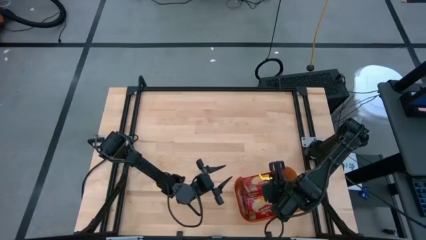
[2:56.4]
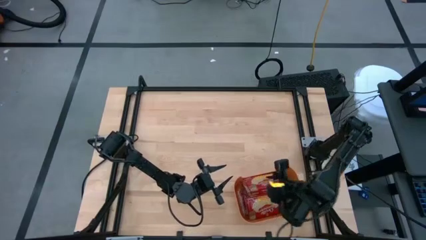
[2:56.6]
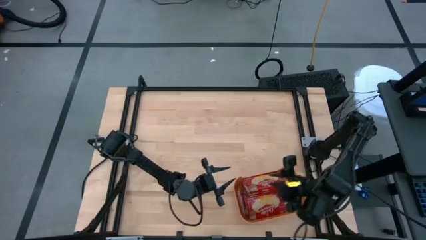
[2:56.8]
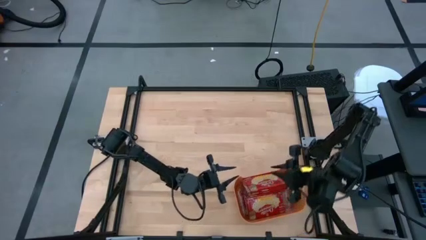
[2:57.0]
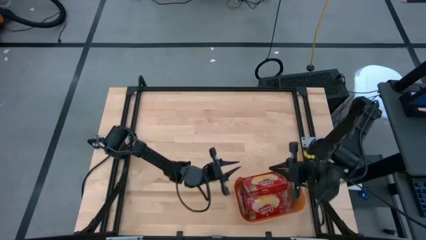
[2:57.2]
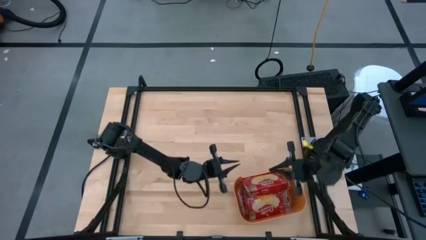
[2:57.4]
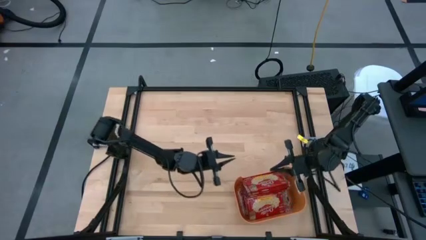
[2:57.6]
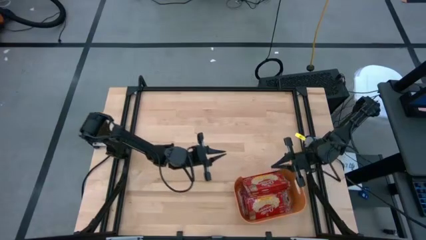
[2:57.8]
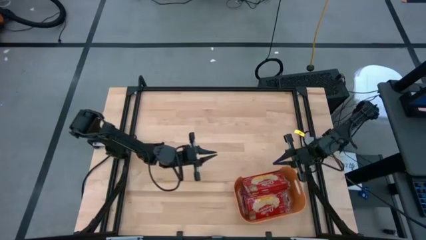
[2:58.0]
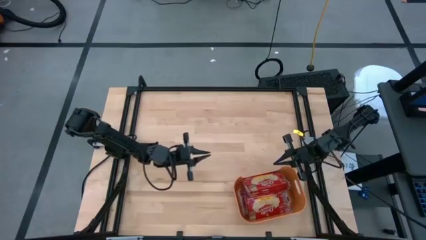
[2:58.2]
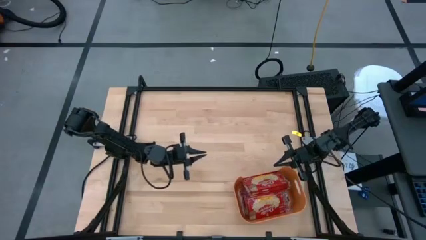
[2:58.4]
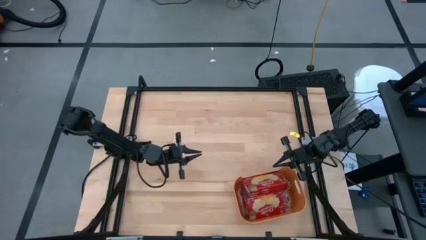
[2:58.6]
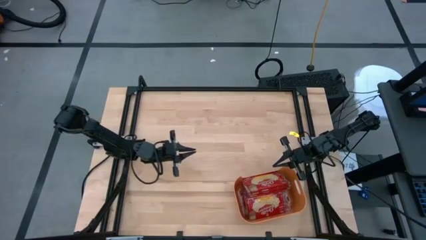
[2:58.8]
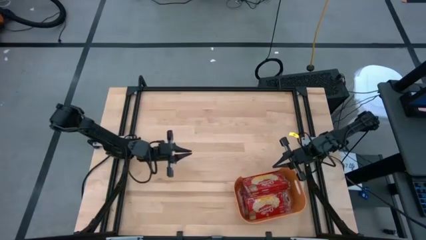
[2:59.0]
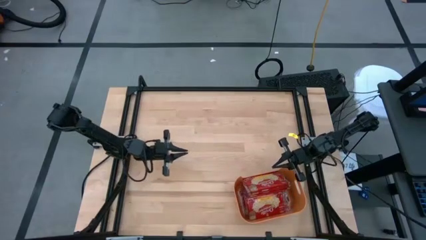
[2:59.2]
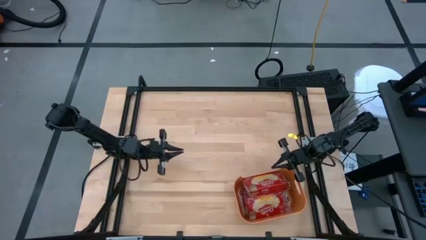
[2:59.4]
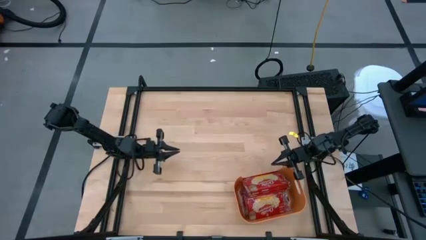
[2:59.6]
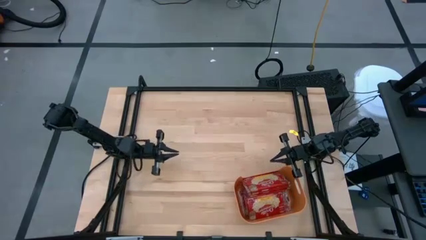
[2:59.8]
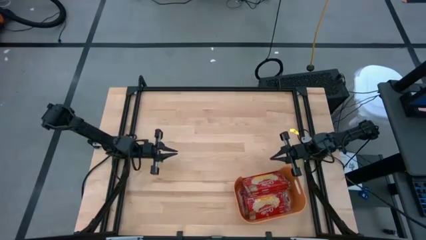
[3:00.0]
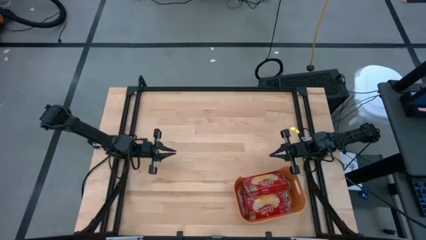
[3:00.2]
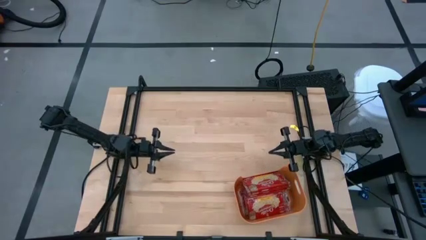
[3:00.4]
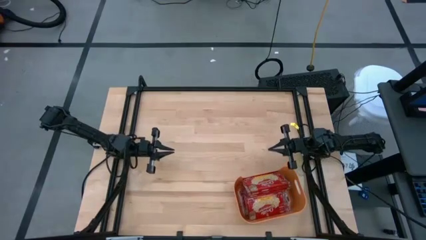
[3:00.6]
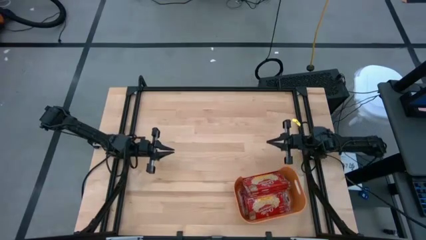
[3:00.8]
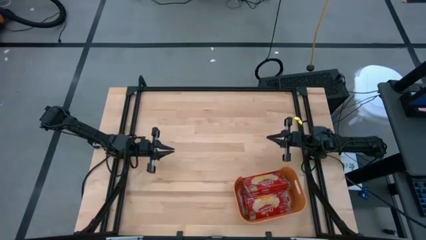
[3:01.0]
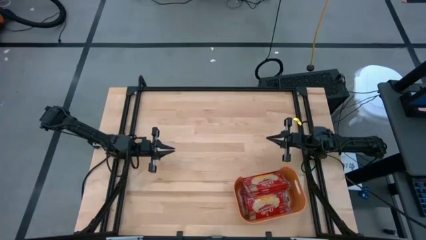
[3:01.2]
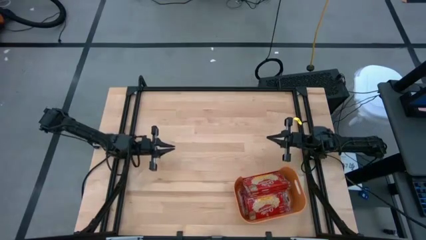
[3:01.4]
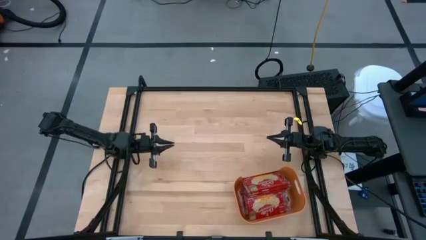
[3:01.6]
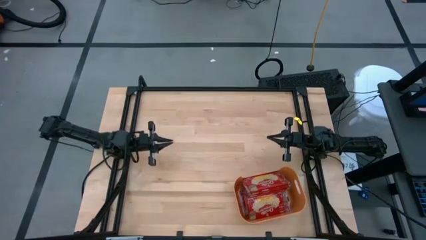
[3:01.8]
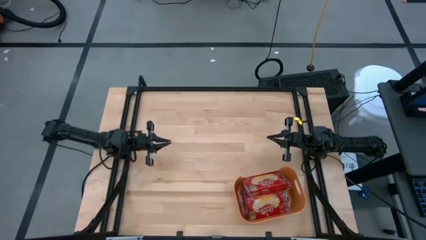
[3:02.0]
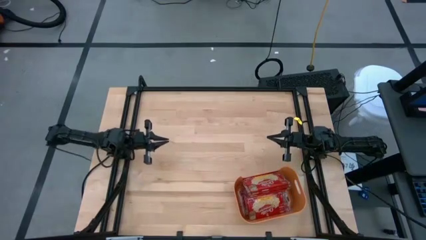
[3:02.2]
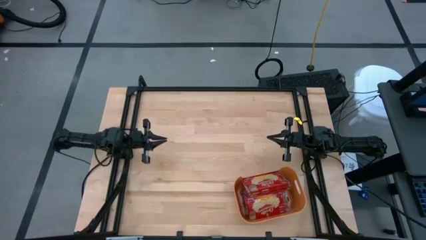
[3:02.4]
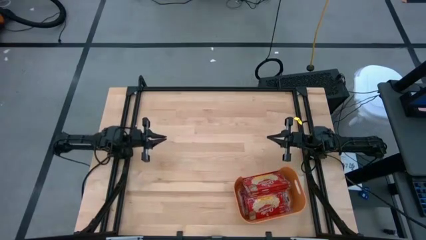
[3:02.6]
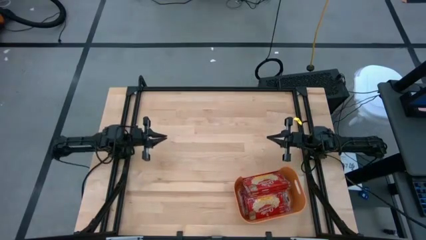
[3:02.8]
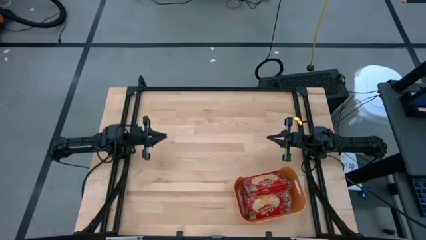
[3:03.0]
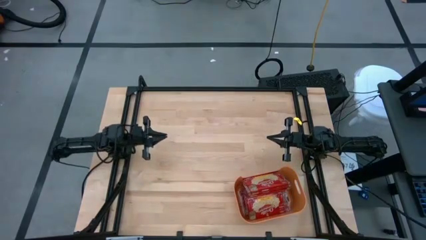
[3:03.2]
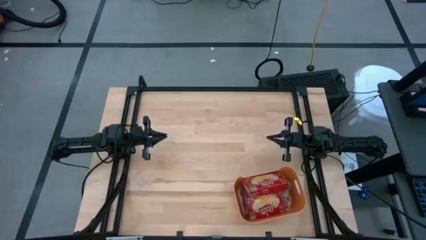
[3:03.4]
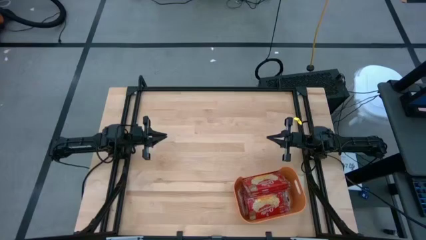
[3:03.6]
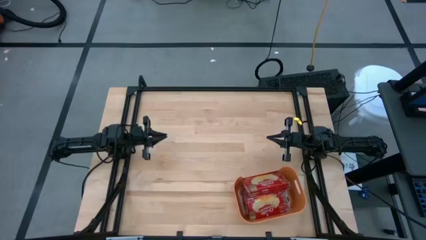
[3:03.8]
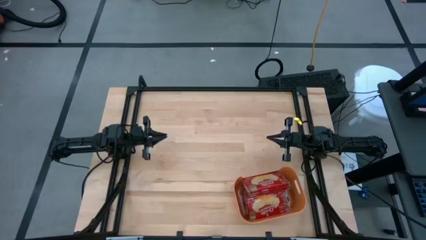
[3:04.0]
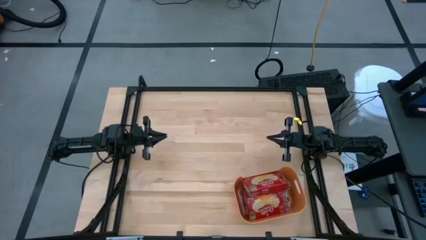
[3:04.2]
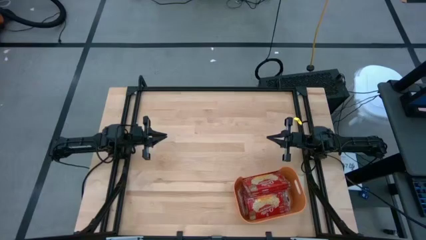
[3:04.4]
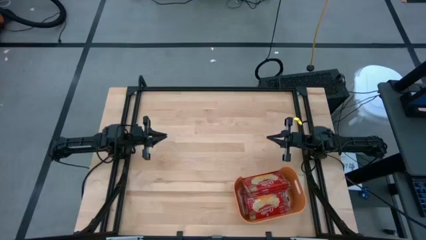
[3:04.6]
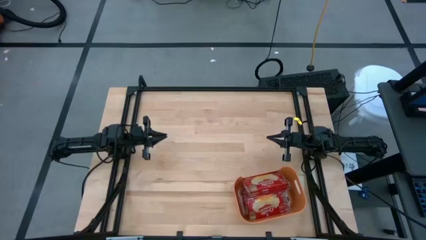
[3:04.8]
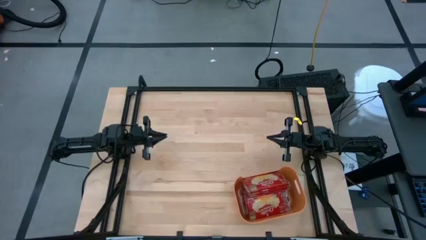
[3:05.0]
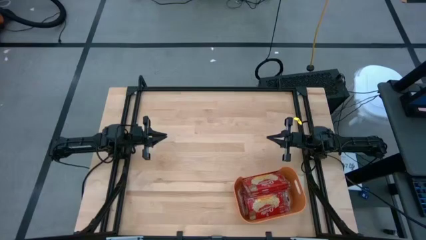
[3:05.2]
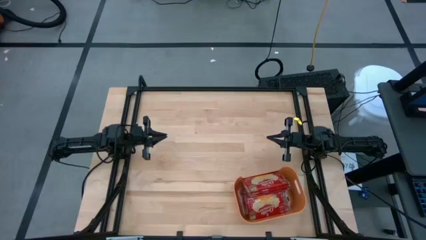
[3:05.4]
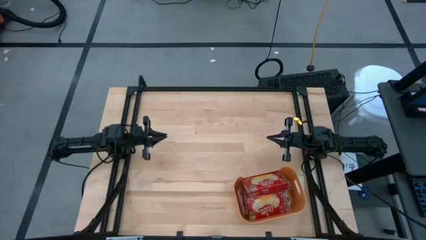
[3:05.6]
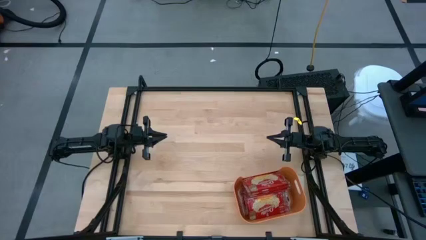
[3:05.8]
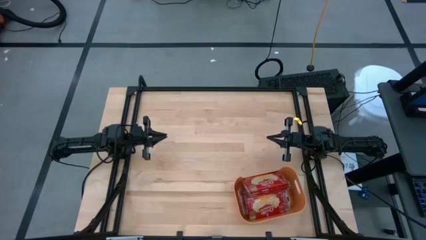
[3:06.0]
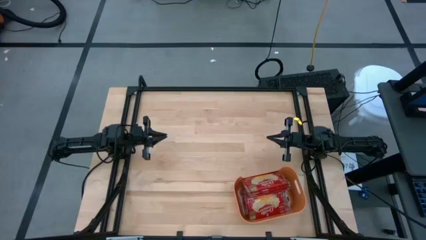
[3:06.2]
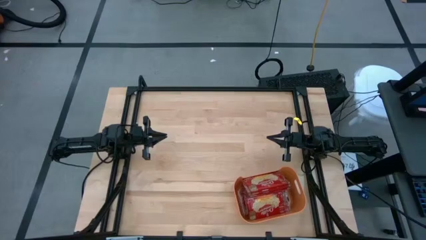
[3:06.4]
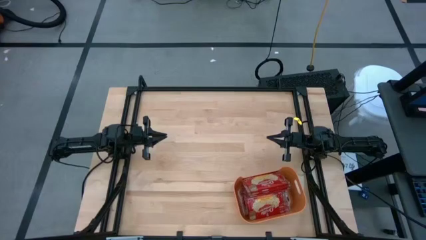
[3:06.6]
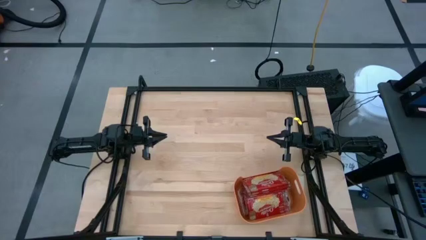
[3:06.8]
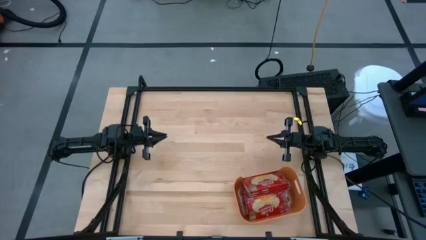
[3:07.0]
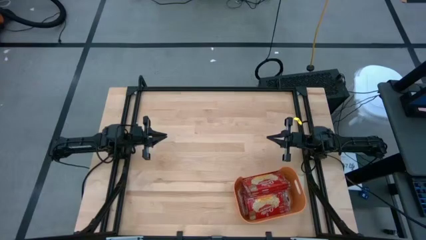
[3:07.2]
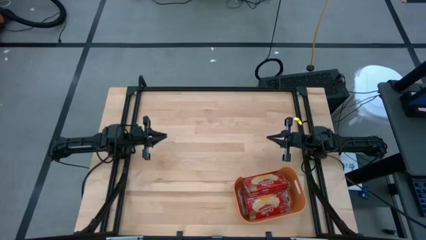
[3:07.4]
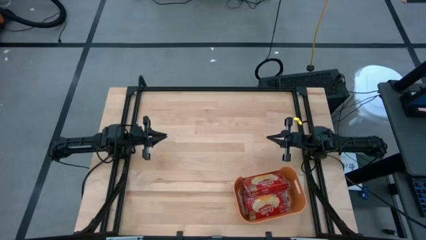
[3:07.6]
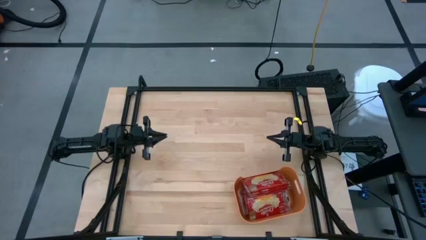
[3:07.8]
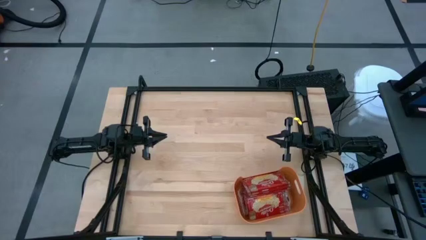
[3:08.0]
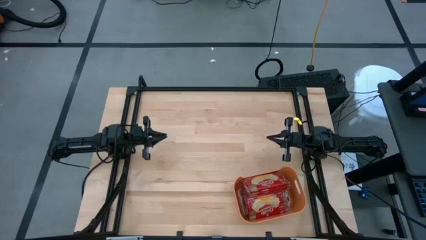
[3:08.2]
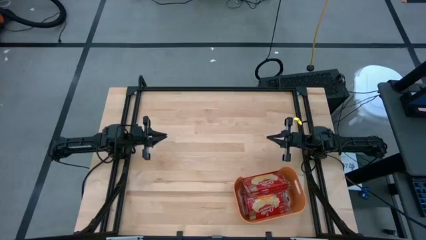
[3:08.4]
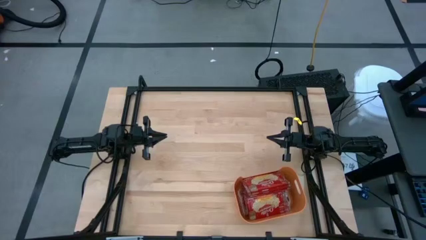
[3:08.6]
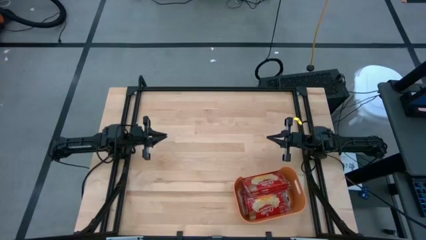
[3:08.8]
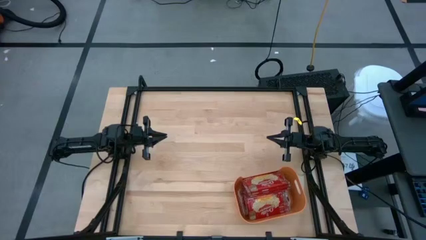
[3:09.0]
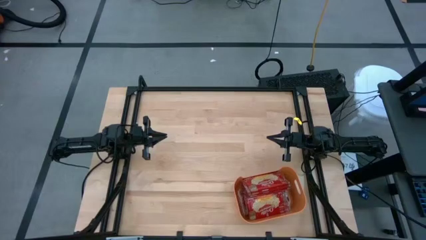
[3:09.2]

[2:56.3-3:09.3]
Task: Sort popcorn bags into baskets
Return to Home Position

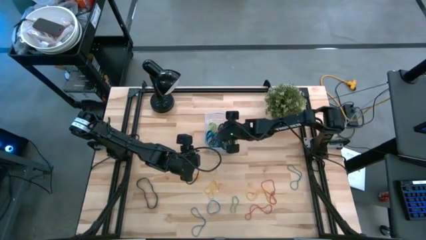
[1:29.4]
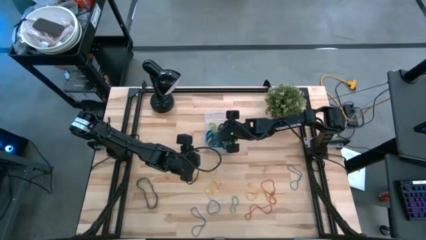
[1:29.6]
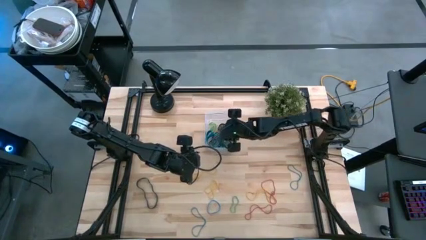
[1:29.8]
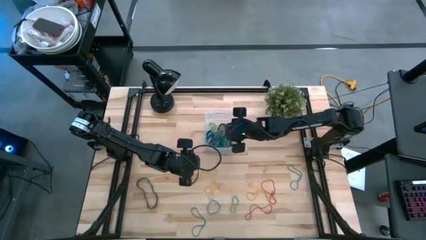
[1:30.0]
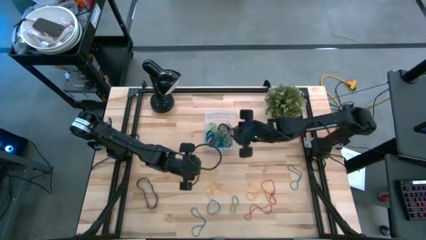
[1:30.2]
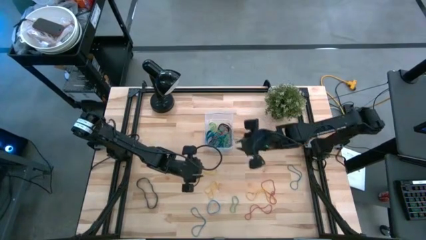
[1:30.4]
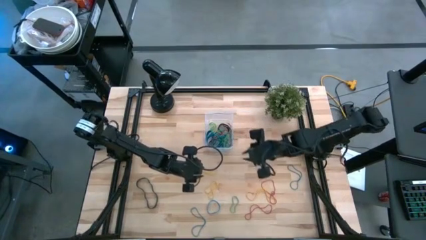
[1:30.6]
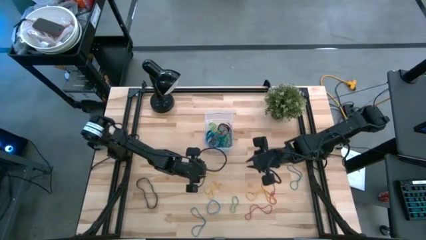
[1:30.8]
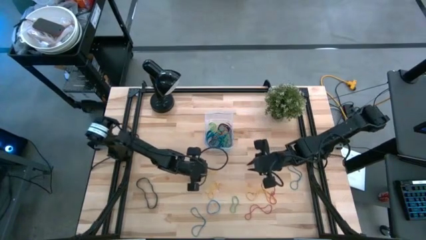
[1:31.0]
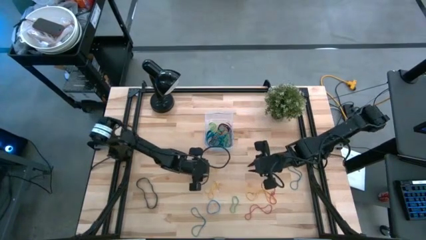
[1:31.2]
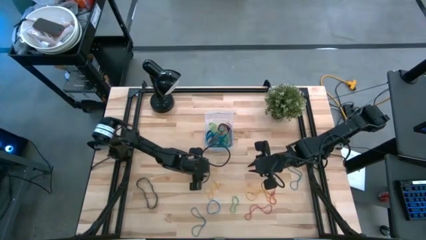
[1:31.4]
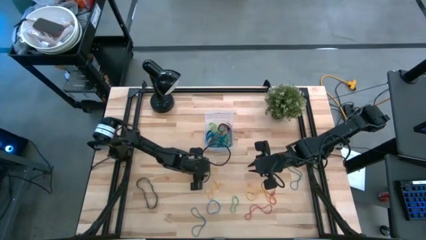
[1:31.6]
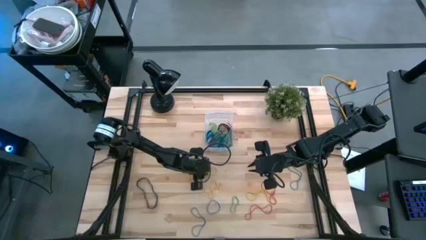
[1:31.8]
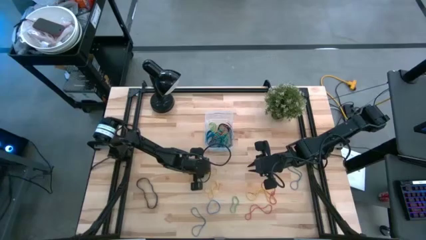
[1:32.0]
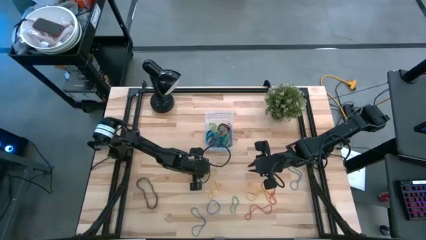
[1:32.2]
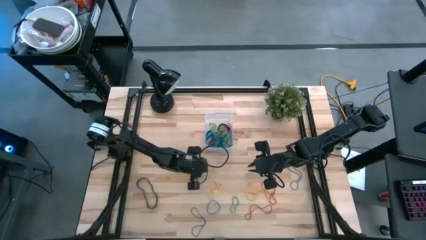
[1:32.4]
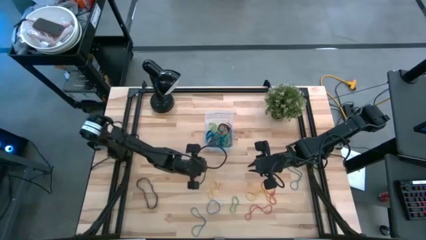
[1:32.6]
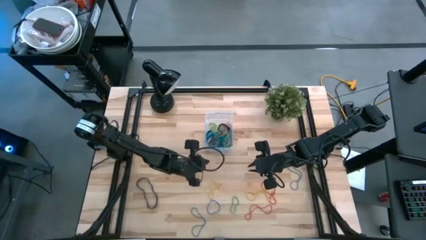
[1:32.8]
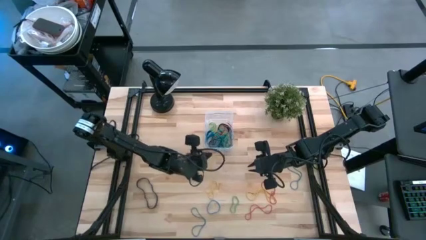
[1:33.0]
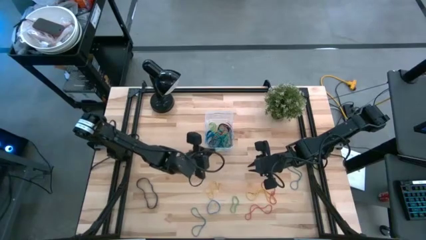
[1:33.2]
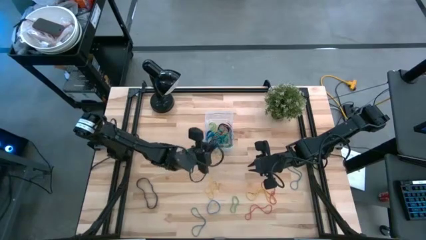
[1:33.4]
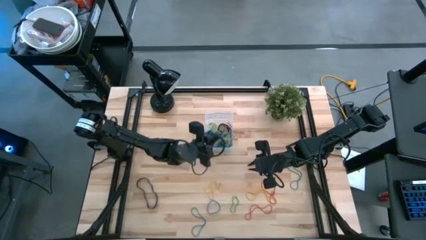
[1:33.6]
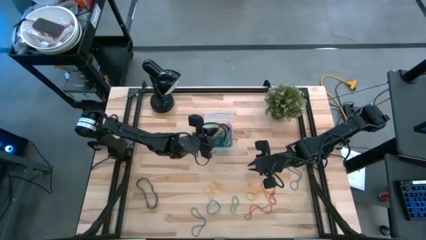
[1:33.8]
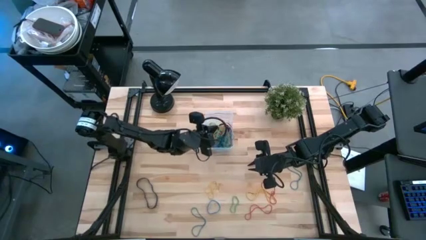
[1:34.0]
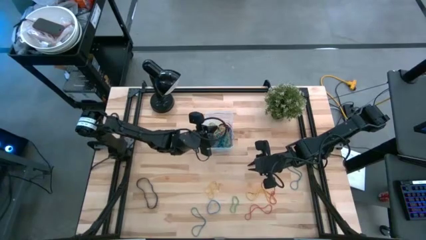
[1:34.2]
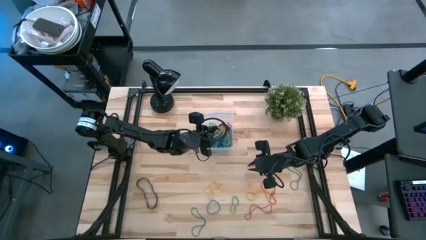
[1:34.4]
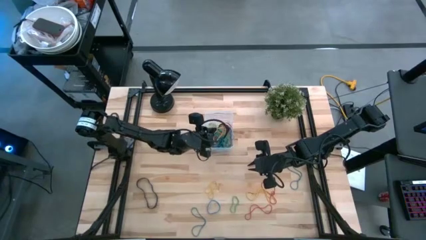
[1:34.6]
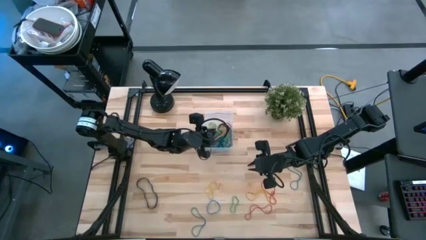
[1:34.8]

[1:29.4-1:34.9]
Task: Pick and place rubber bands into bin
Put yellow rubberband into the transparent bin
